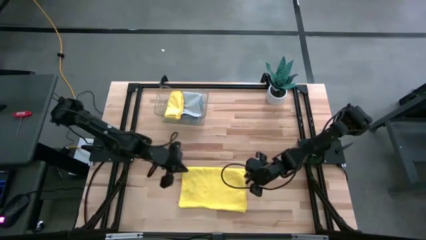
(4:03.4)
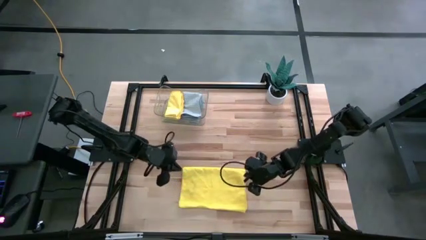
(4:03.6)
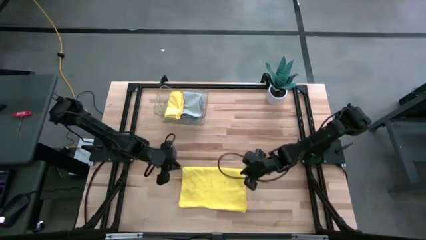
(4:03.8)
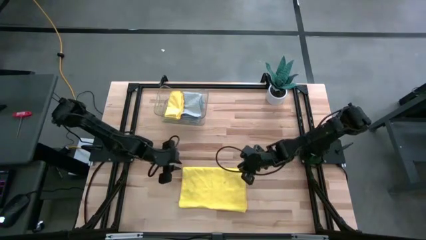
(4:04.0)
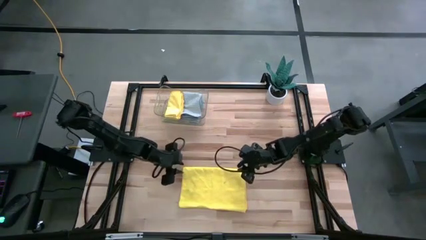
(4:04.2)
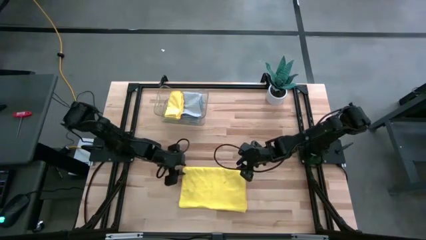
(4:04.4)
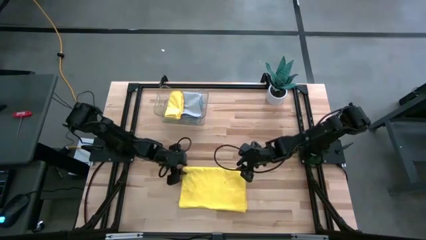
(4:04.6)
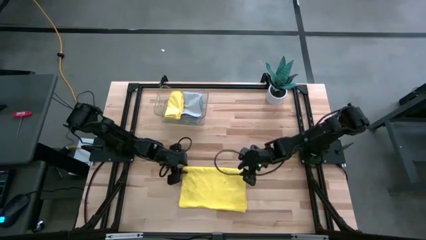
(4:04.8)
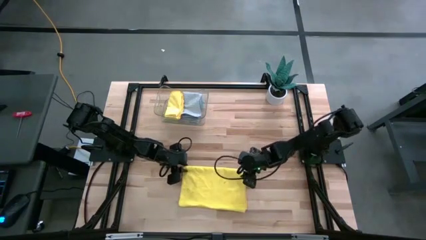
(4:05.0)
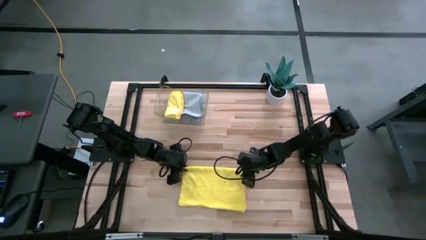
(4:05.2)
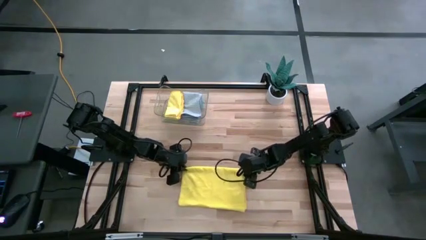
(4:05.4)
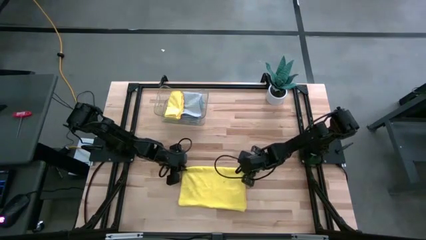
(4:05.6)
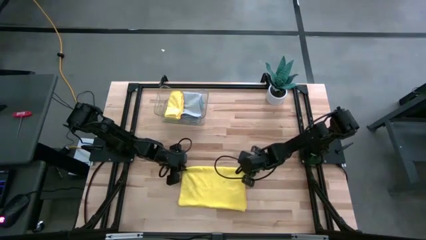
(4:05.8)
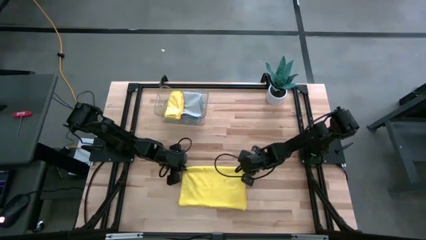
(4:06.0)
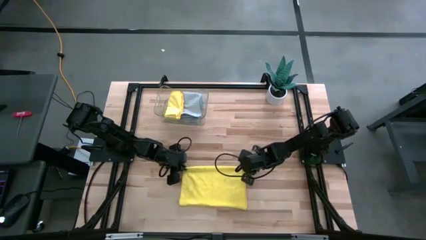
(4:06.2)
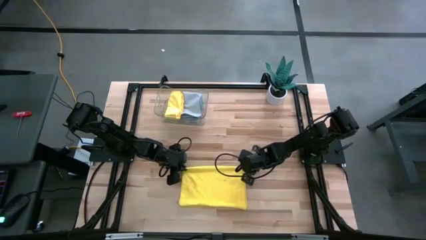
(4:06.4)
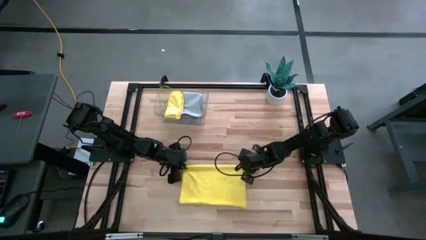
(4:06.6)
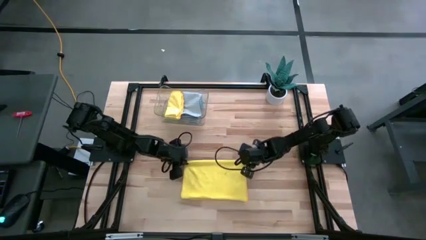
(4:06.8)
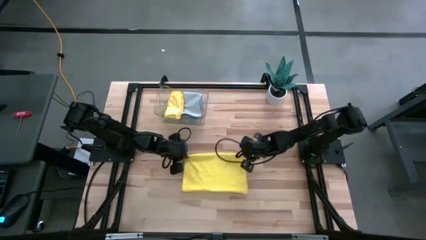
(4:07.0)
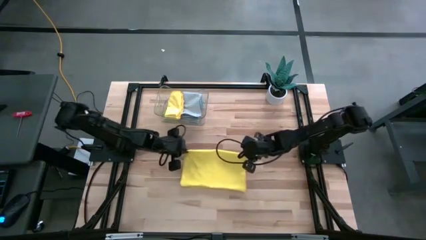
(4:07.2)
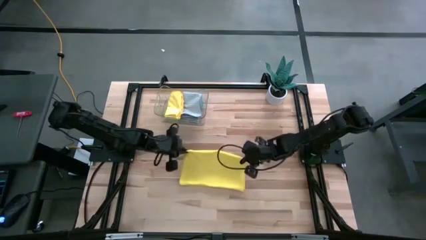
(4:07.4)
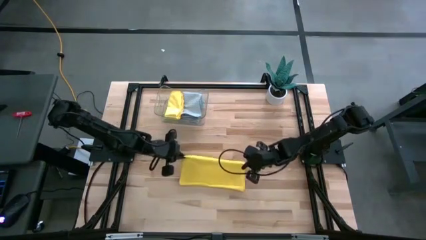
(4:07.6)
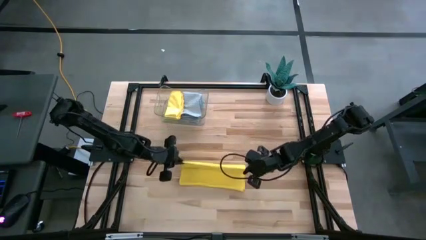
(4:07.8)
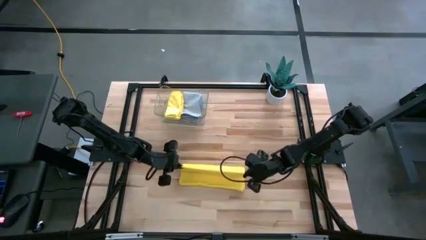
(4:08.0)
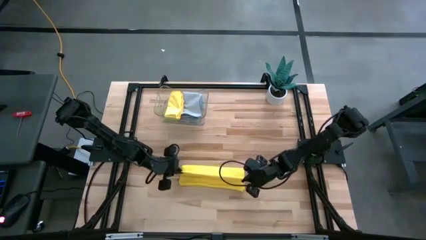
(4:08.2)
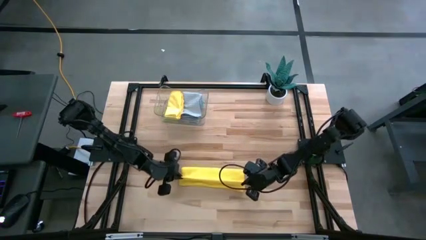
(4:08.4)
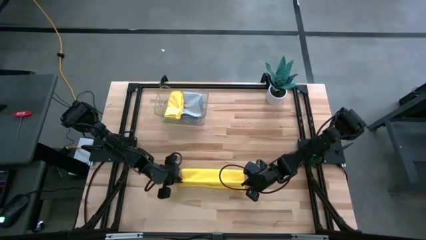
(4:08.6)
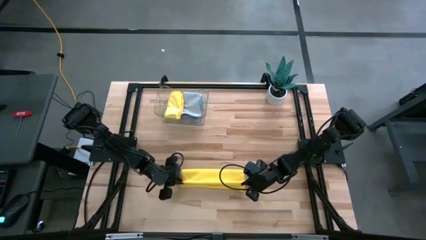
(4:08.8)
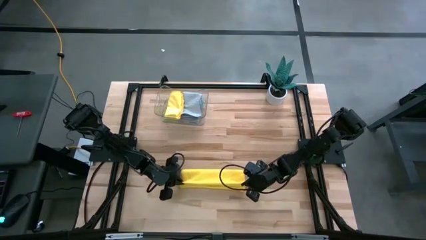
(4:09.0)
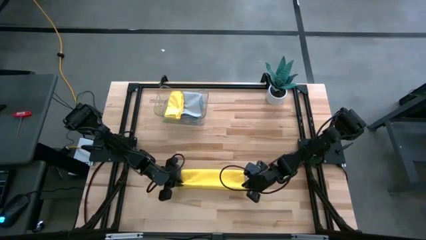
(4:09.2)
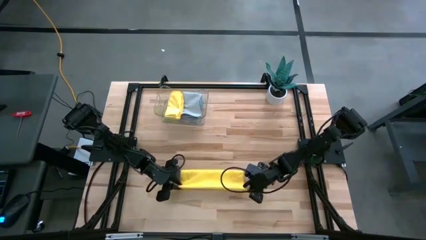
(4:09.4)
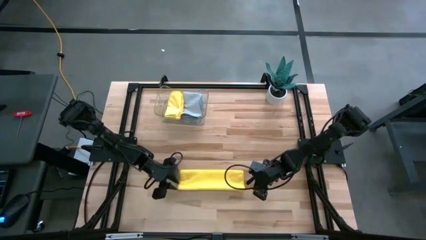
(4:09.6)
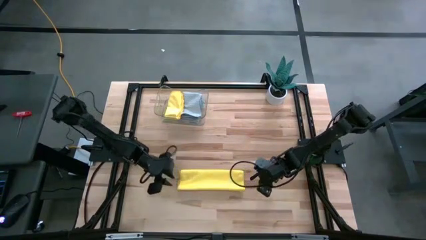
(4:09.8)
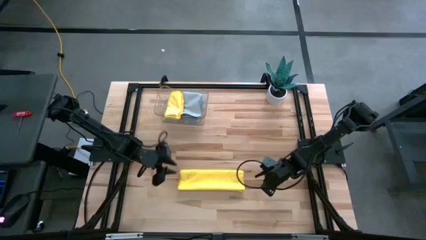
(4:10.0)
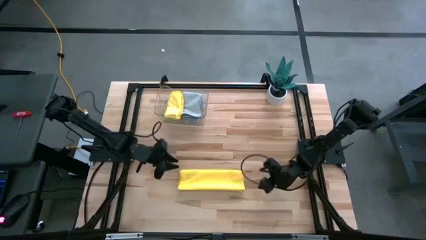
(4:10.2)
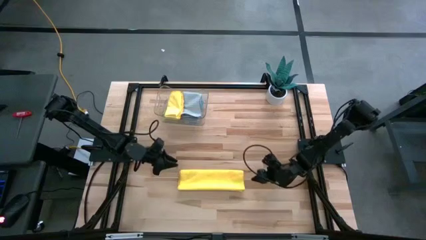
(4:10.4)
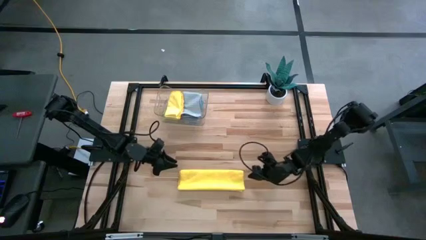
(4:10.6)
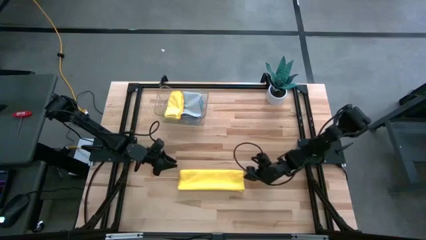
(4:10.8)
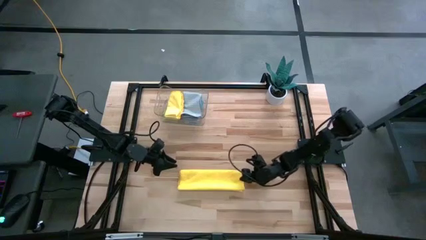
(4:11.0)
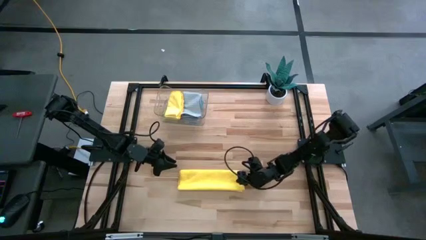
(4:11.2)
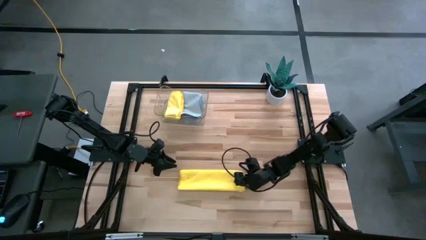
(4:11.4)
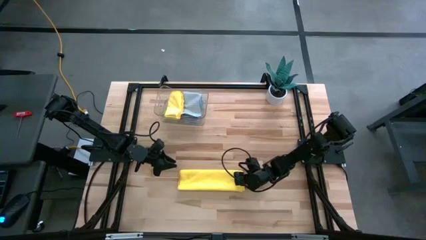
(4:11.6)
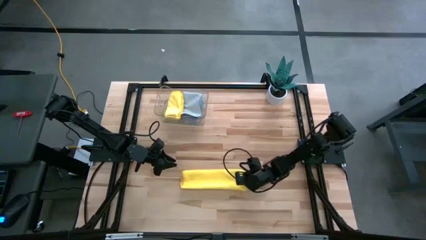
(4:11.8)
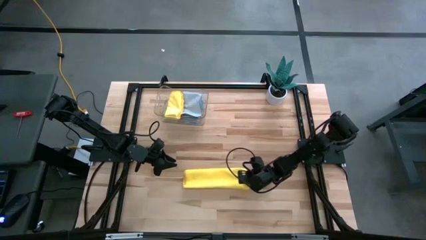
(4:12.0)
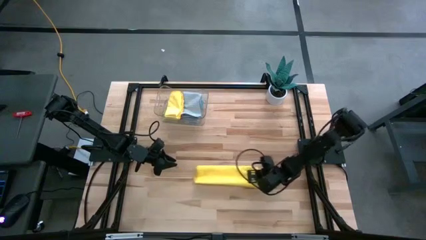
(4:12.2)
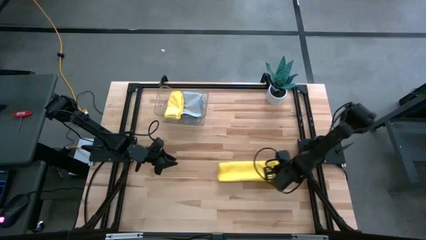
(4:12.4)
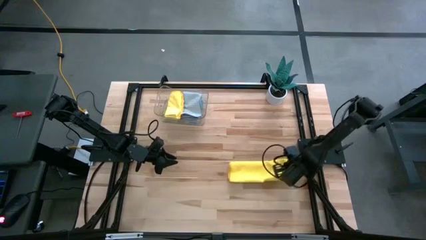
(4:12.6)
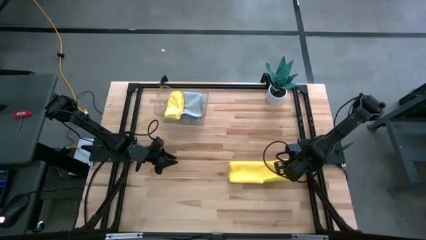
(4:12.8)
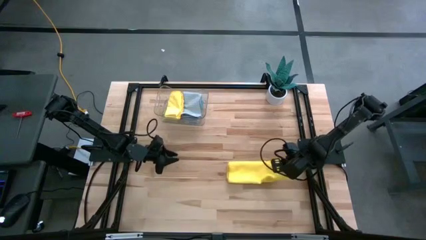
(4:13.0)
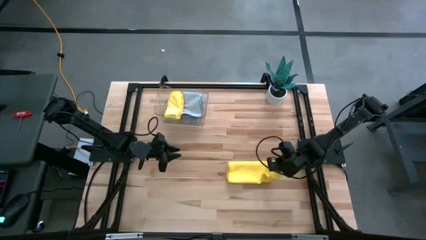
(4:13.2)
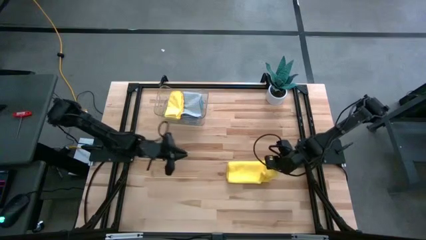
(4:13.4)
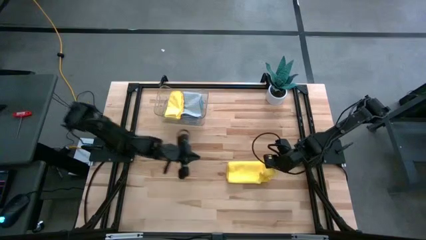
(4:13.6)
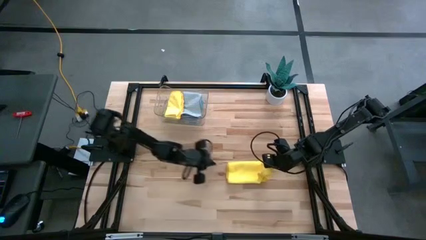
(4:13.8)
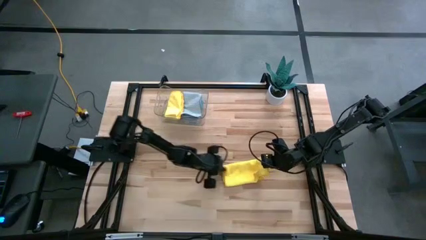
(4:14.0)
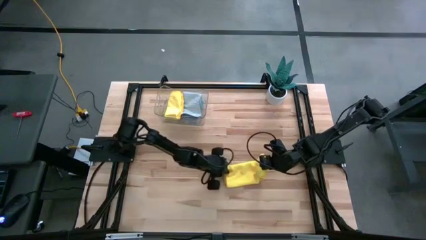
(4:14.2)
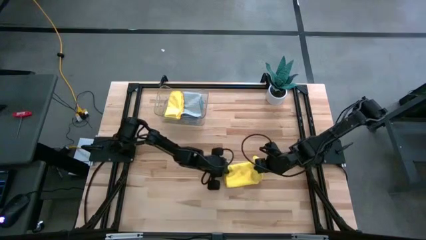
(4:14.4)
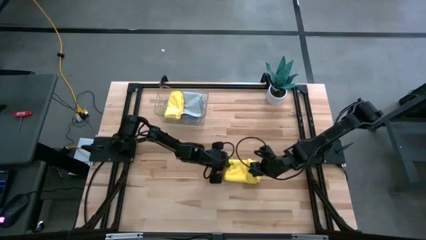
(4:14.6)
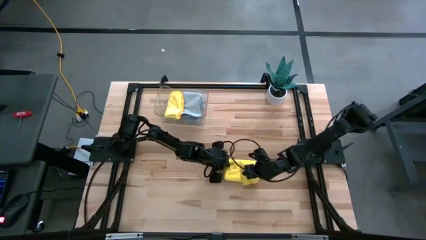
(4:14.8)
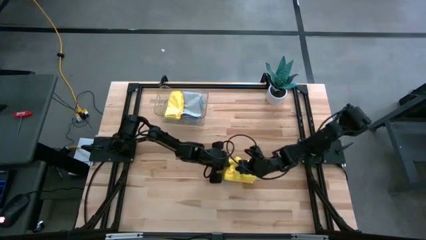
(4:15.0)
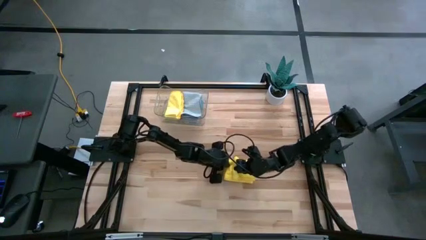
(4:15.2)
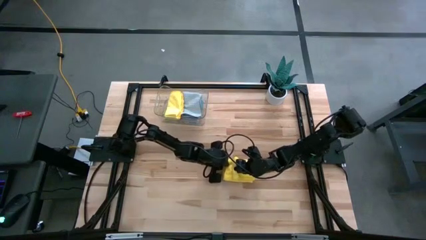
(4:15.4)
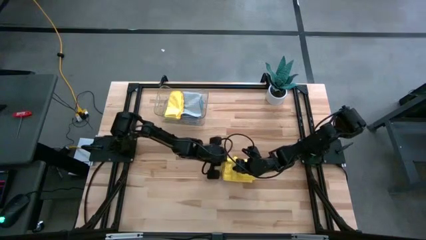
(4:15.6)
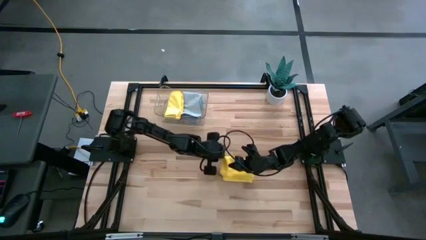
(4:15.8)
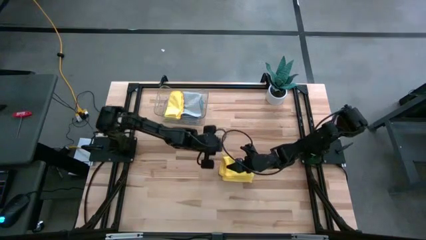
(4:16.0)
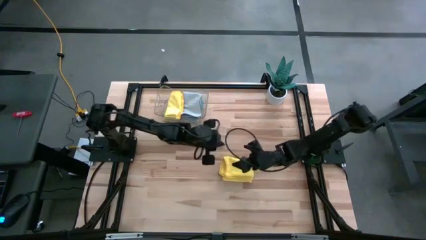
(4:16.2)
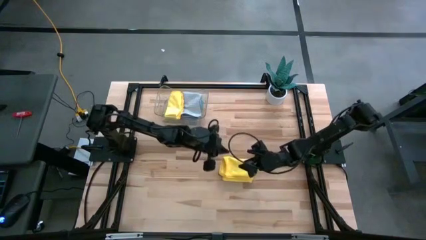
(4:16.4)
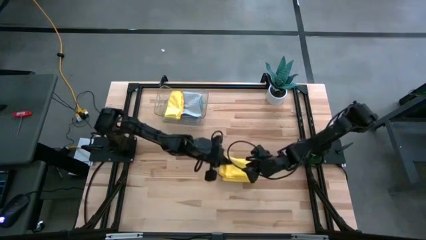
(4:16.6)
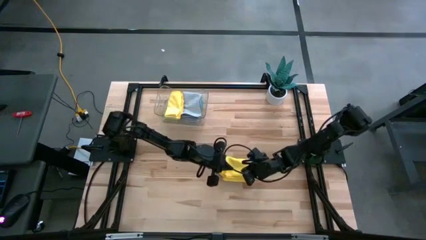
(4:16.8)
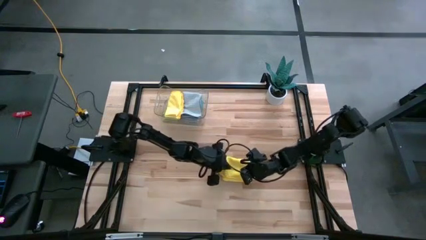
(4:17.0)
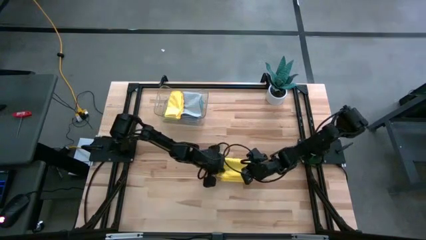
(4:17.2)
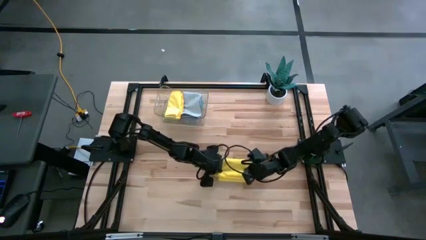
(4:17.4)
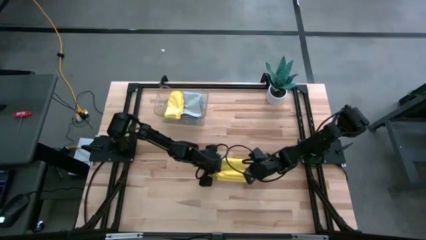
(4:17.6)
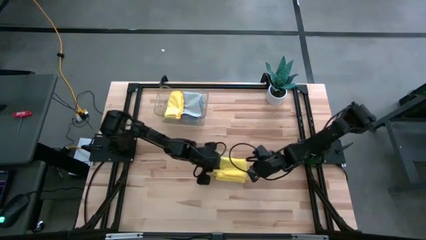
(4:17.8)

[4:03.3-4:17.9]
Task: Fold microfiber towels
Fold the yellow towel
